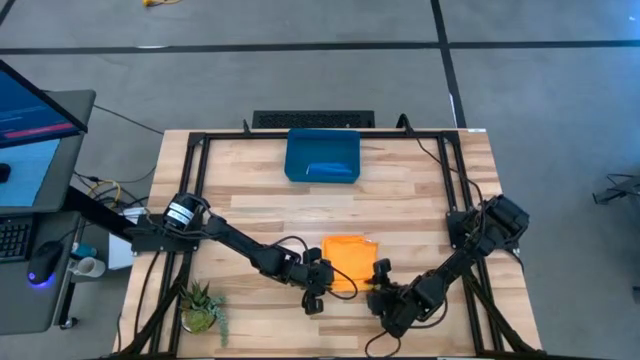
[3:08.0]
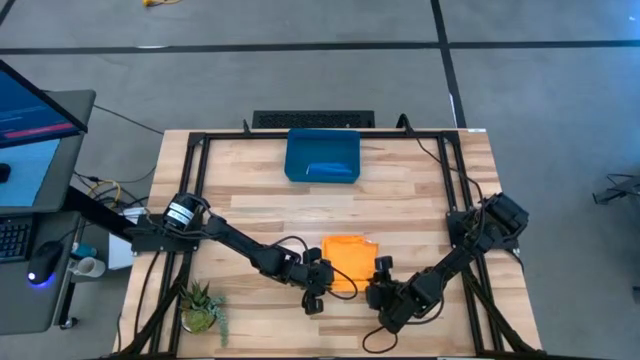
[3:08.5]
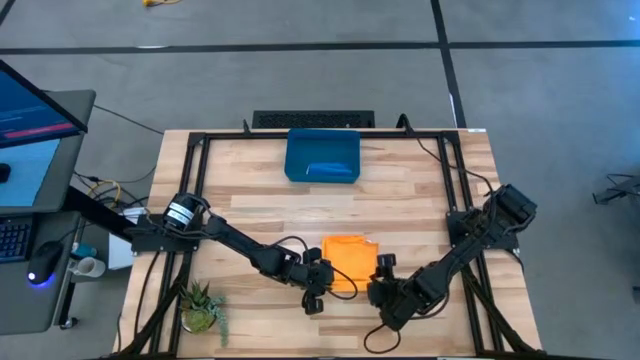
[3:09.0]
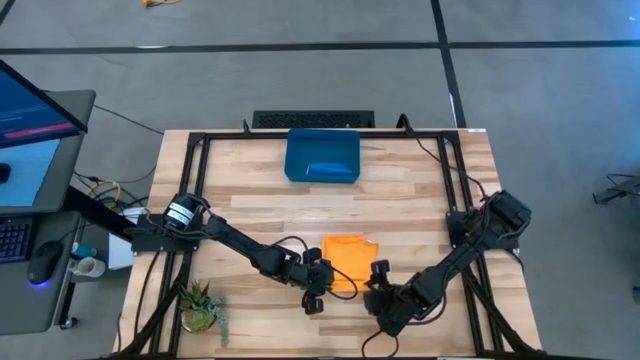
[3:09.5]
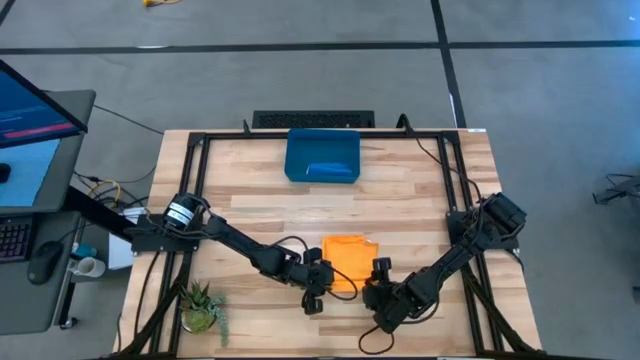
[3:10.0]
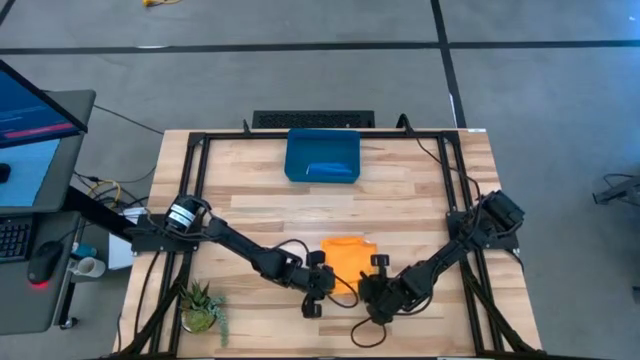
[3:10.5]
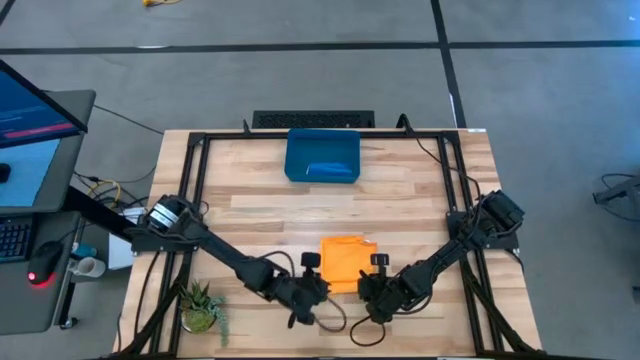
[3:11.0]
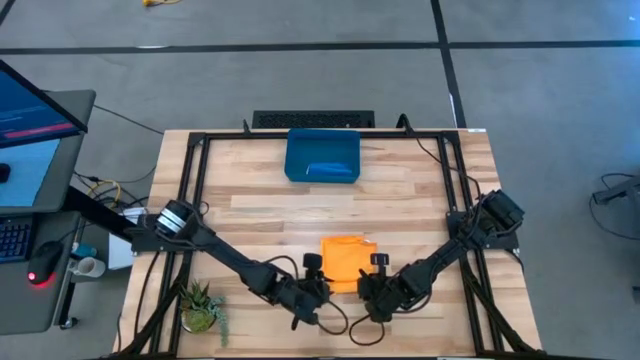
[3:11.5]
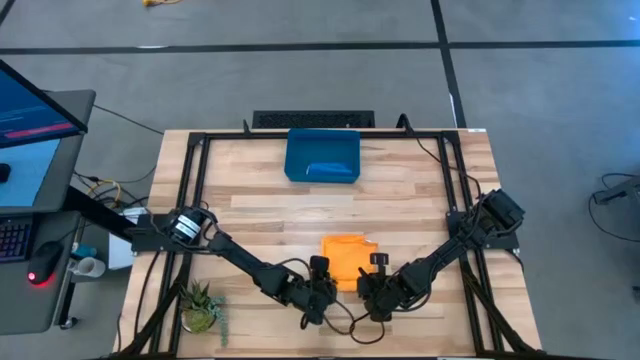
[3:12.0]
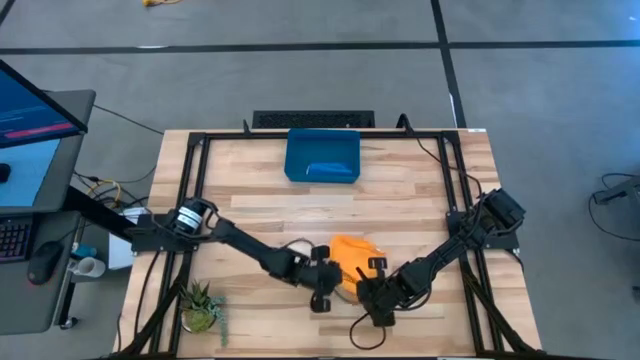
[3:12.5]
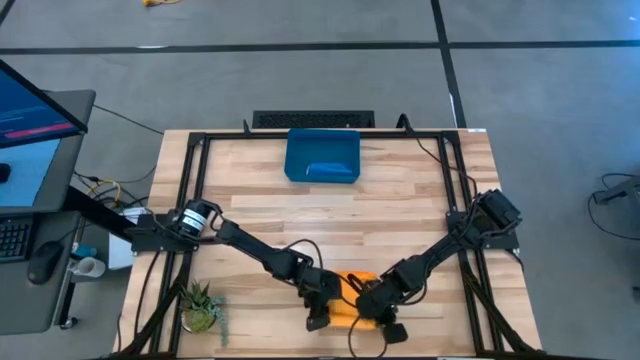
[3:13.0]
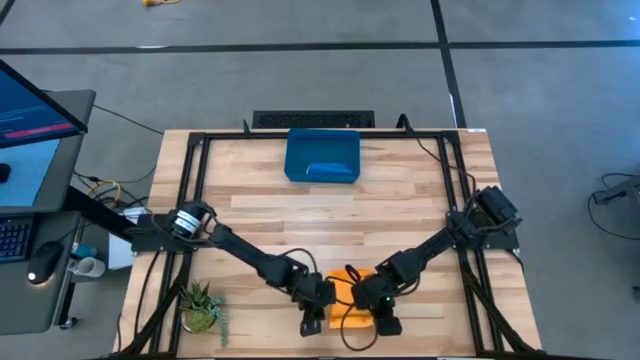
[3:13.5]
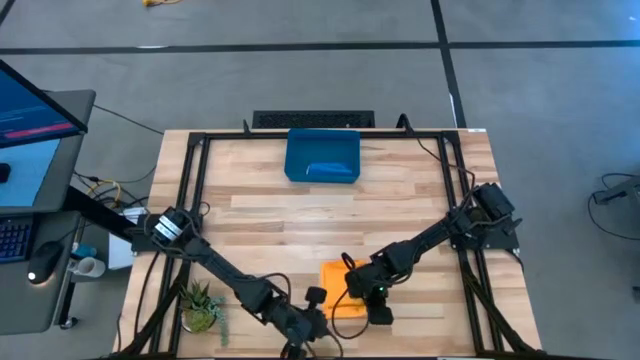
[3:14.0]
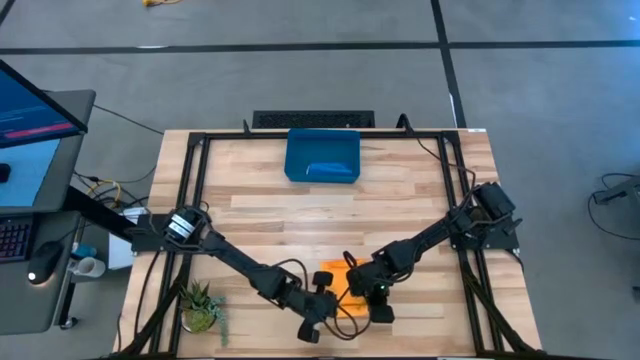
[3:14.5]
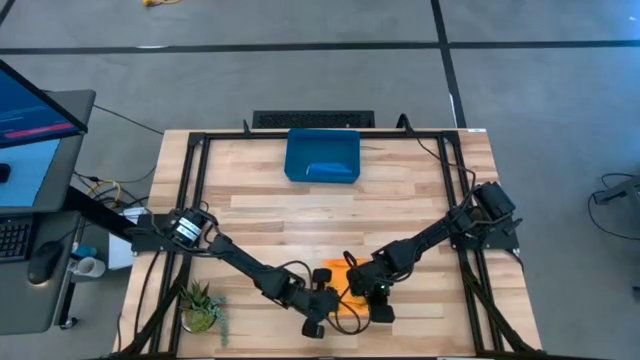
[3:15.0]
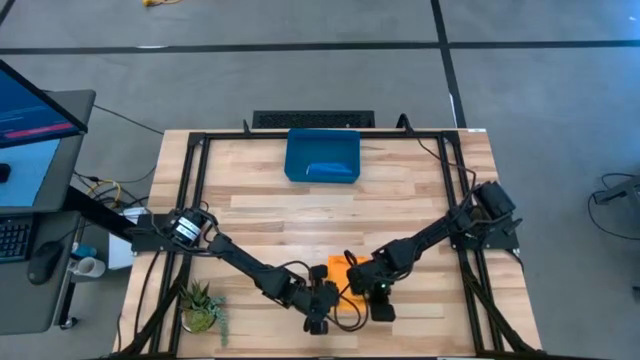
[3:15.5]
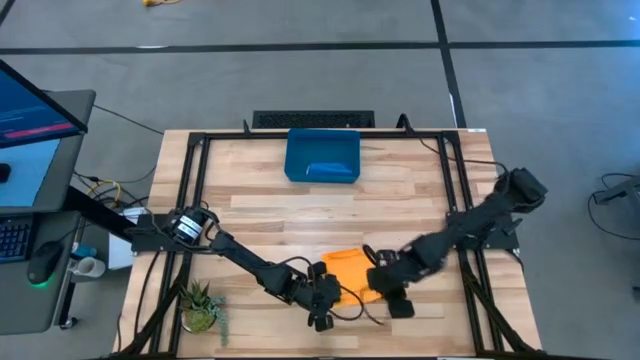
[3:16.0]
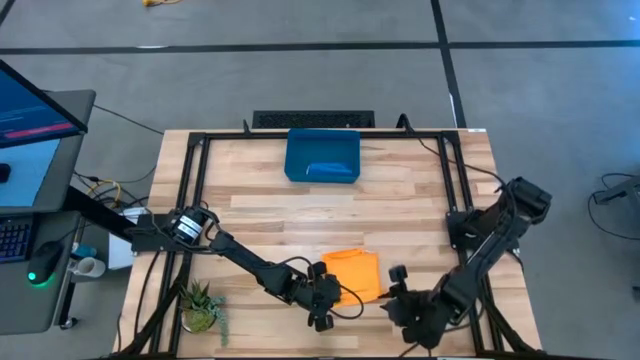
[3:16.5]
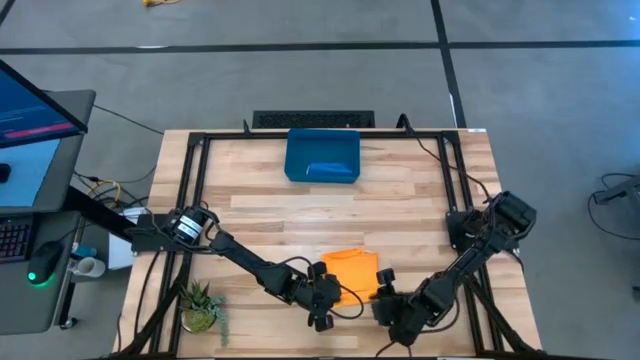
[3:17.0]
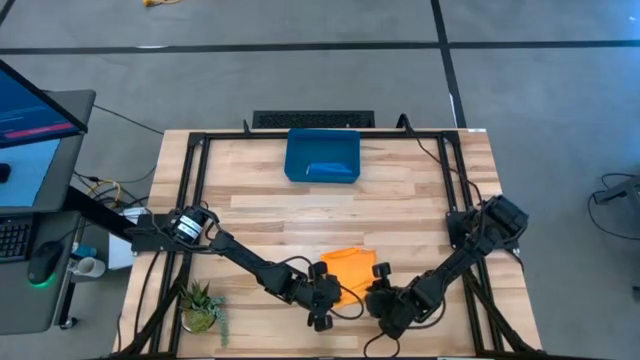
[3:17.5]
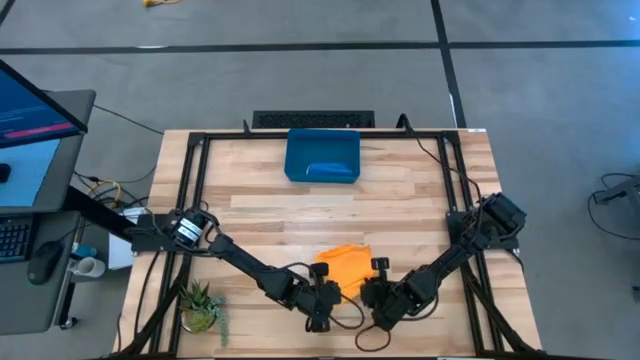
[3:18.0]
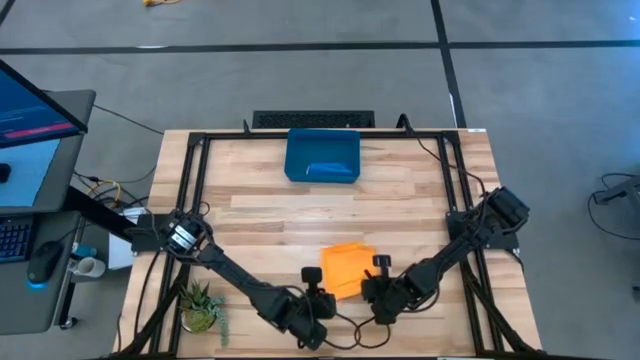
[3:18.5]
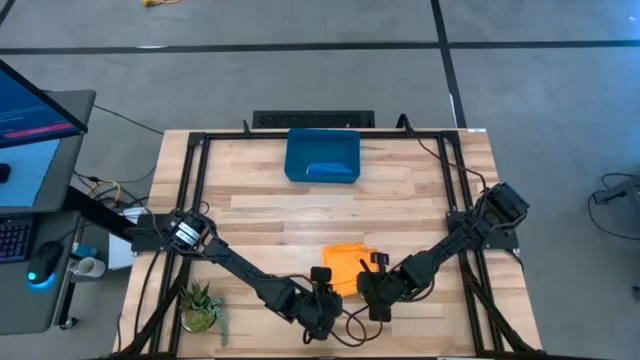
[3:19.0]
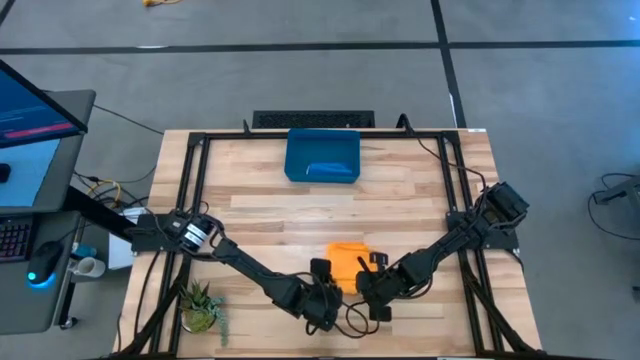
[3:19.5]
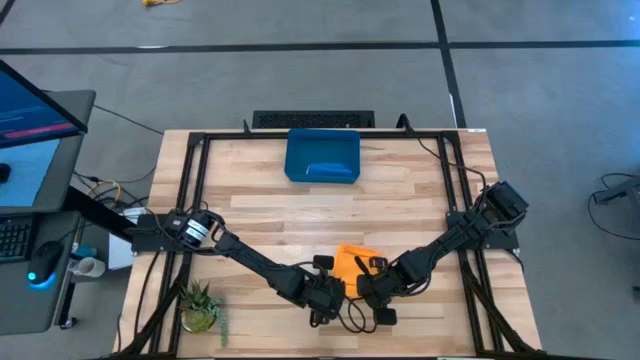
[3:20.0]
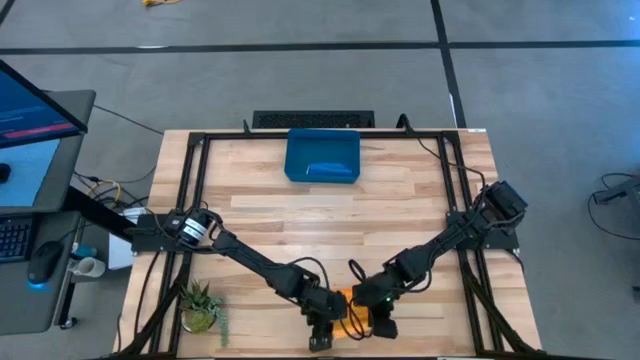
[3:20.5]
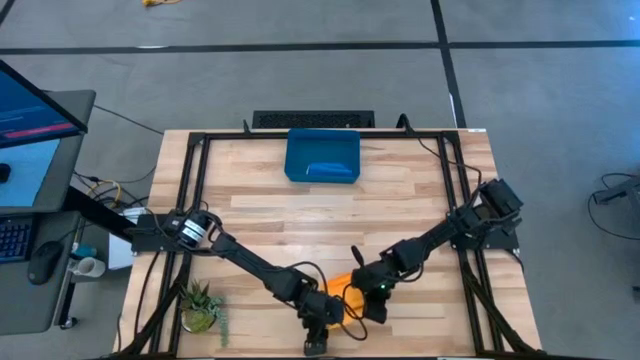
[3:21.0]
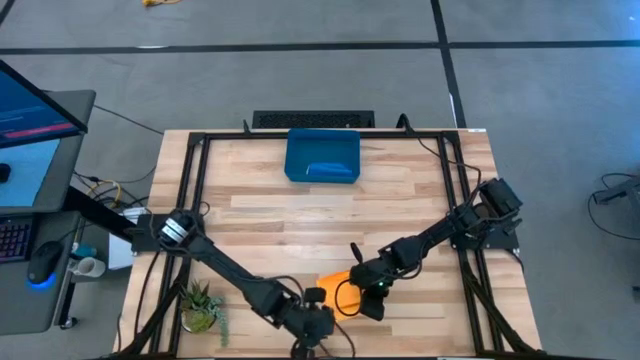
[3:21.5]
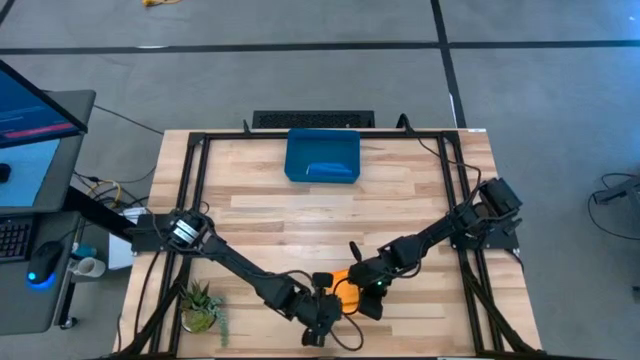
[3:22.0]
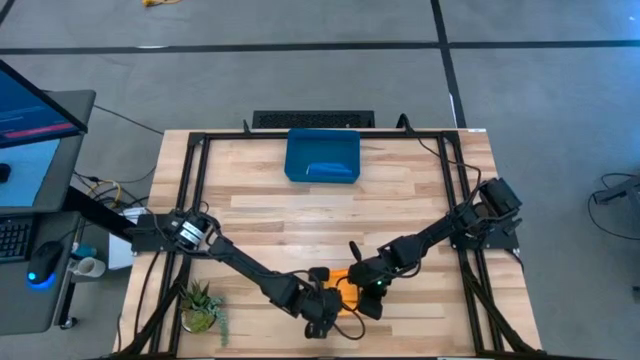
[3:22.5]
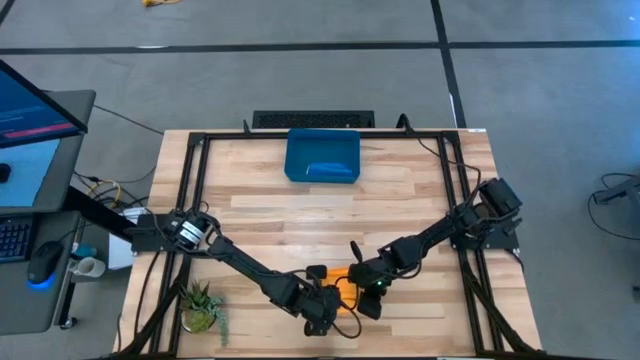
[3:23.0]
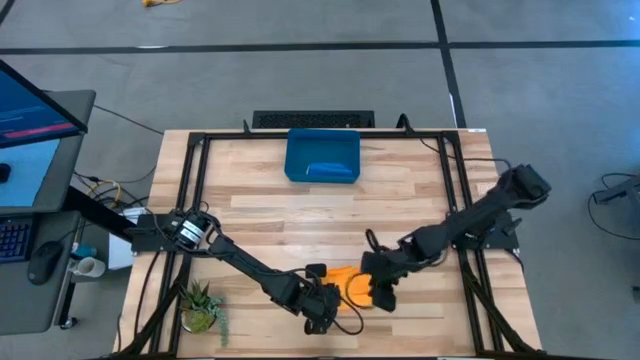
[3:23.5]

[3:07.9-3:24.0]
Task: Roll microfiber towels into tight, uniform cylinder then place into a basket
Roll the orange microfiber towel
